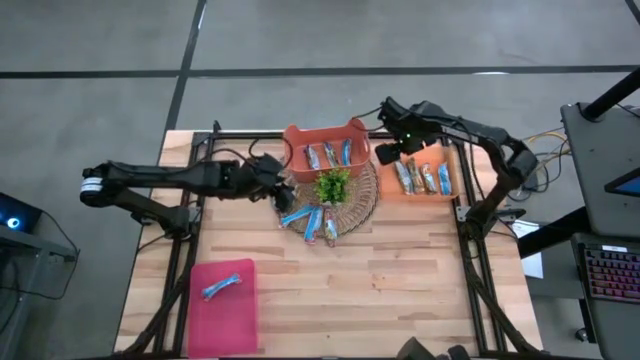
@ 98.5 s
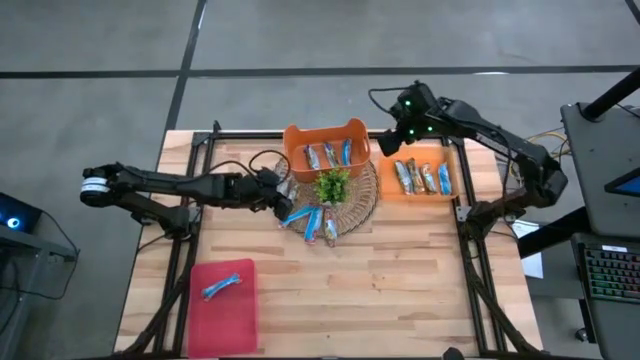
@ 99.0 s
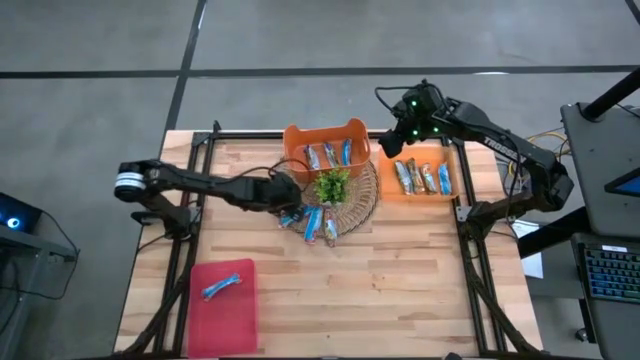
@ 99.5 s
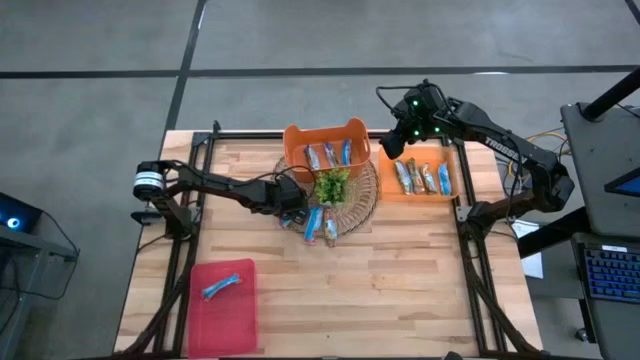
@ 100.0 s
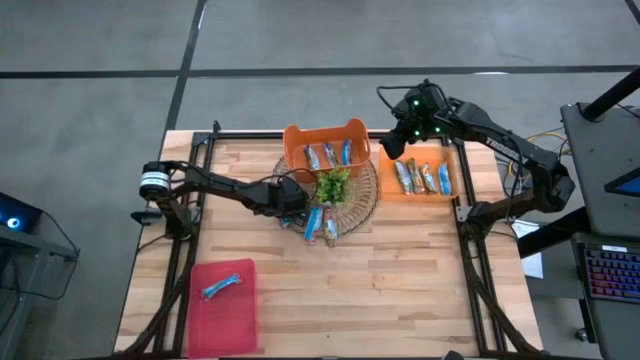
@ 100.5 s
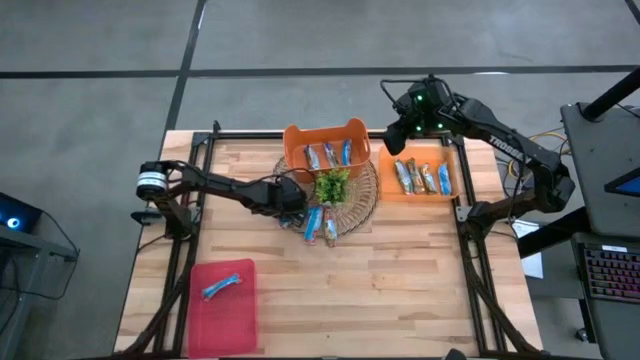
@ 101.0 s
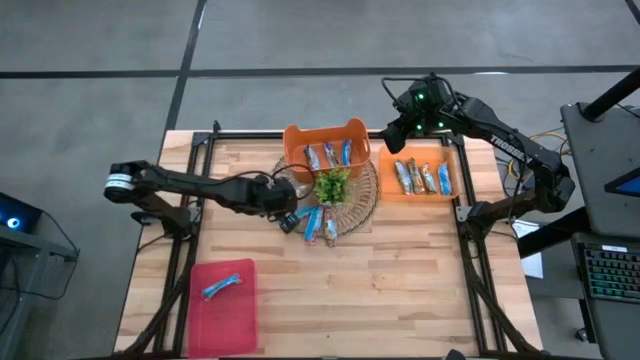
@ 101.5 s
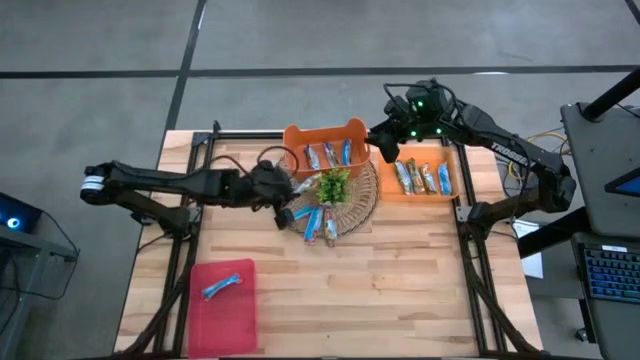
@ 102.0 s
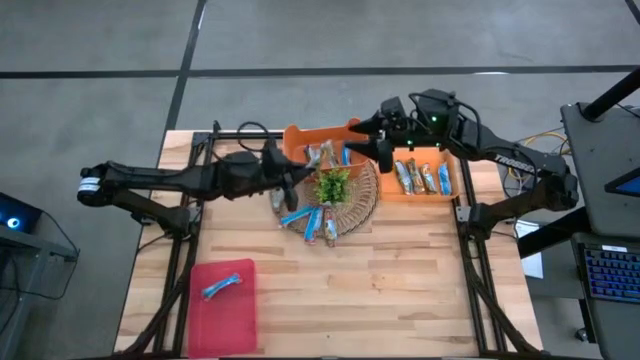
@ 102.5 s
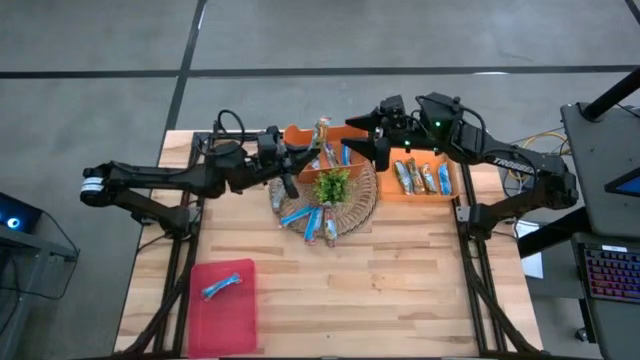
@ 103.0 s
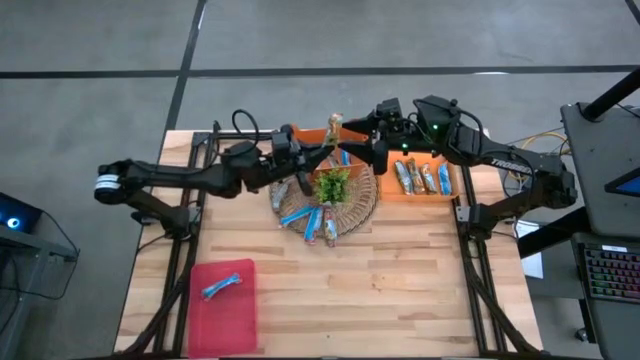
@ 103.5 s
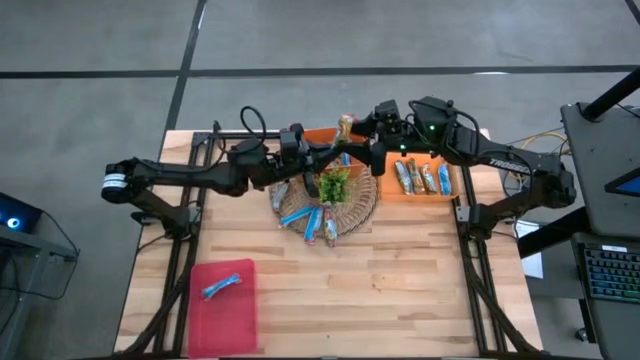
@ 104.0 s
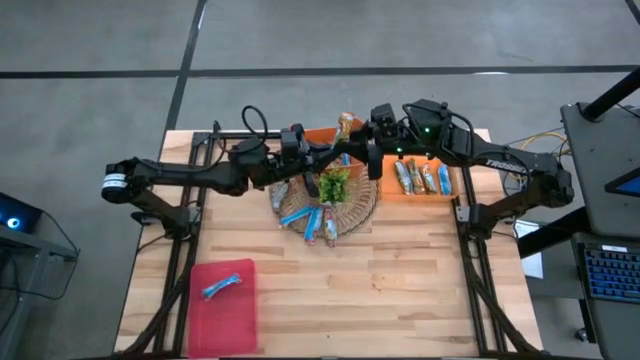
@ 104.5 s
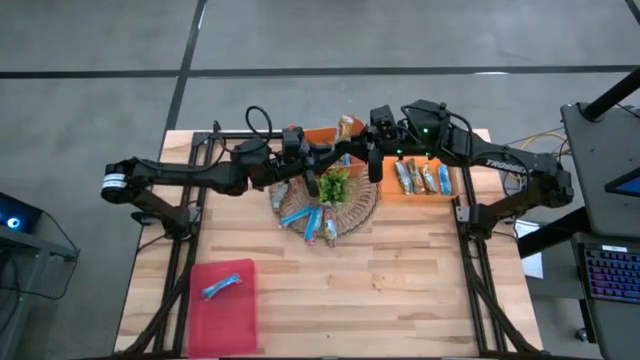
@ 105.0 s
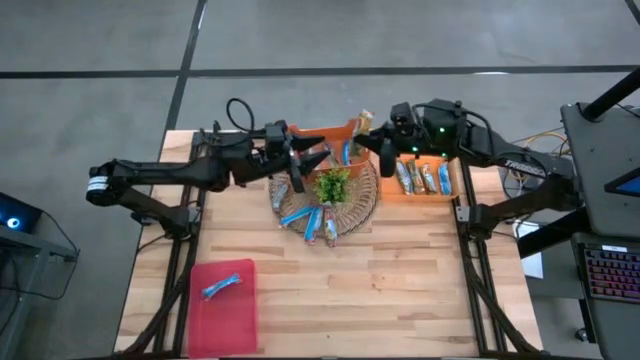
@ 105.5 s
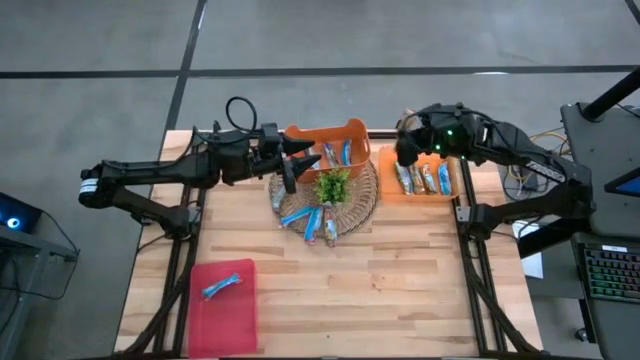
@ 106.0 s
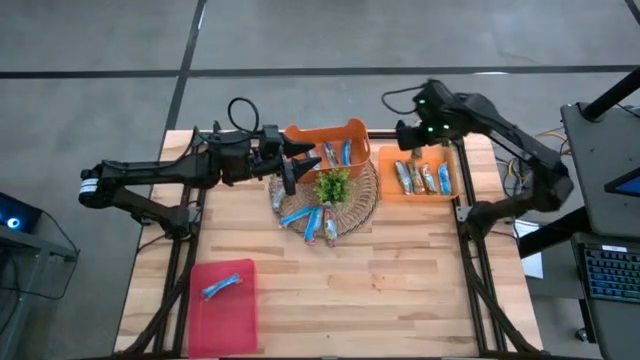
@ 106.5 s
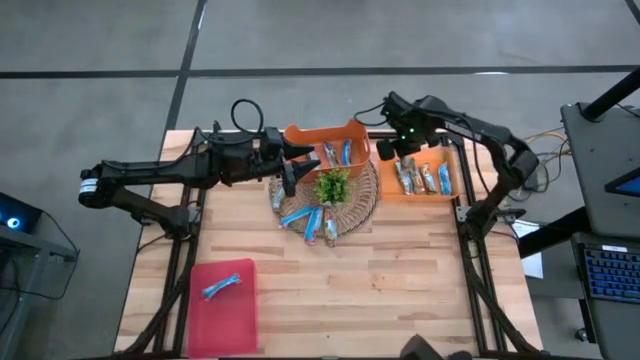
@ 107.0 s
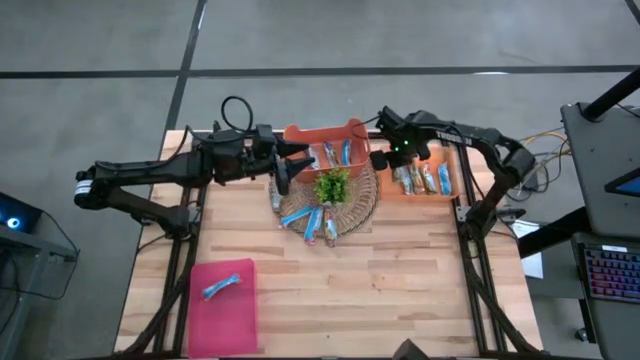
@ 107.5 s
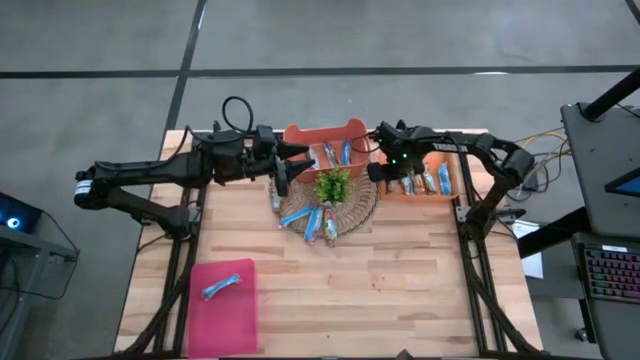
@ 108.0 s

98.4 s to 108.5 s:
Task: Pick and place Granola Bars by type
Put the orange granola bar into the orange bin

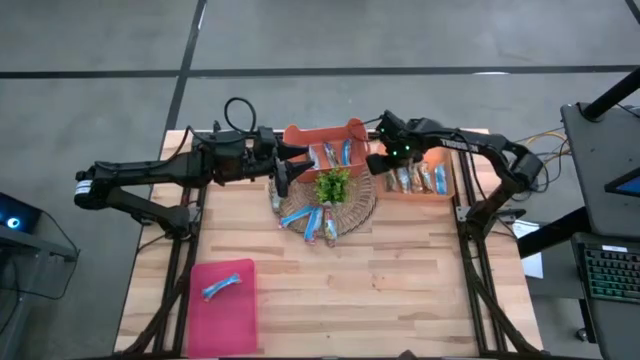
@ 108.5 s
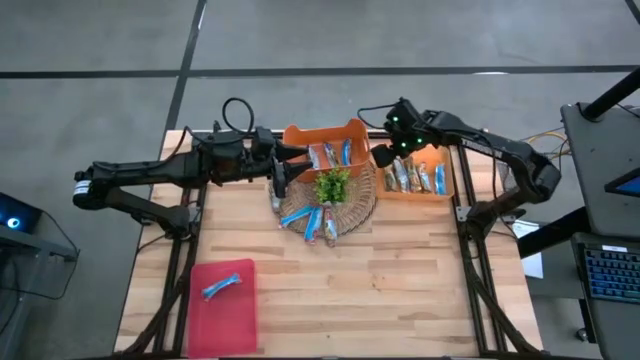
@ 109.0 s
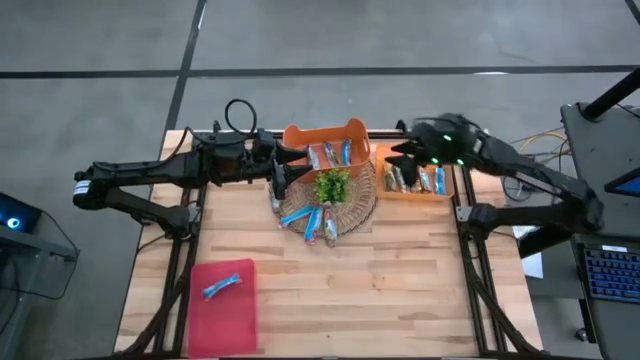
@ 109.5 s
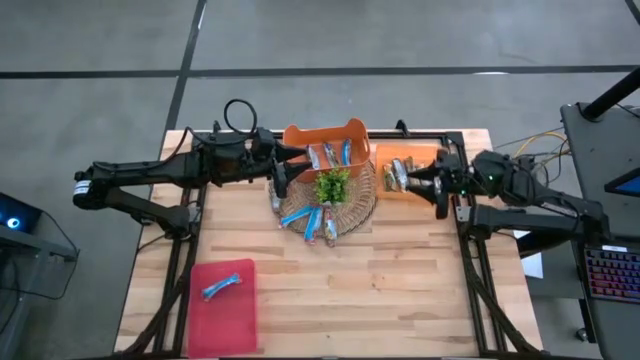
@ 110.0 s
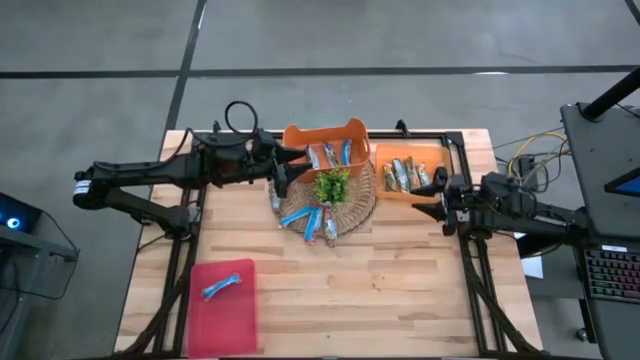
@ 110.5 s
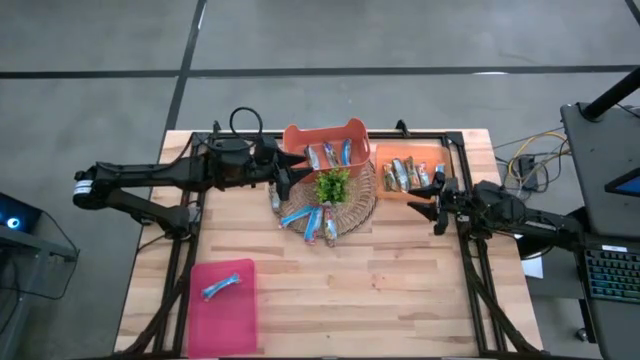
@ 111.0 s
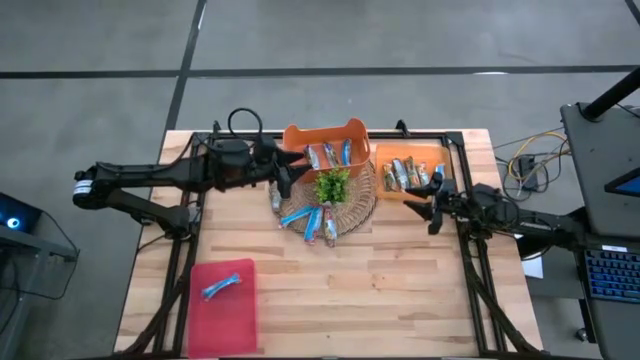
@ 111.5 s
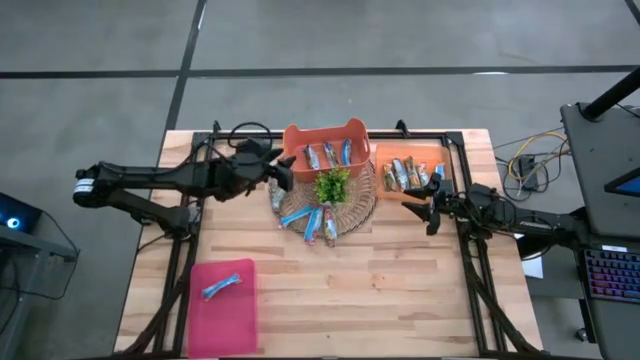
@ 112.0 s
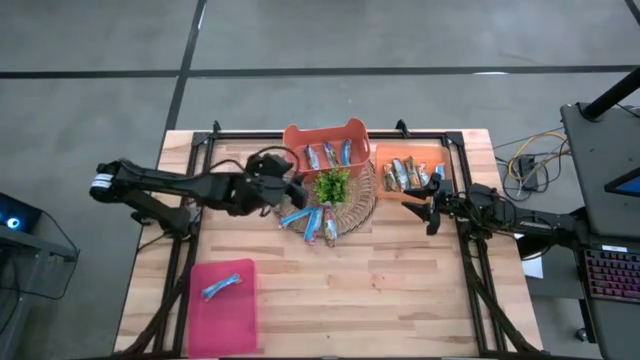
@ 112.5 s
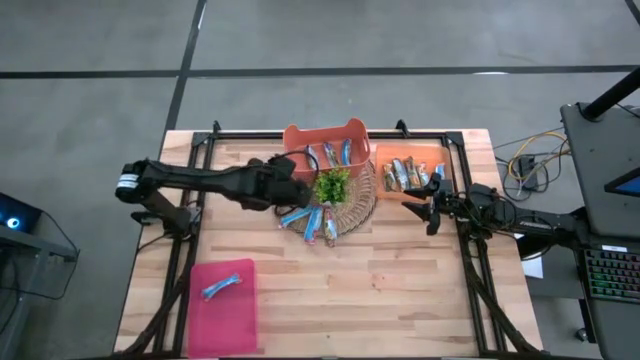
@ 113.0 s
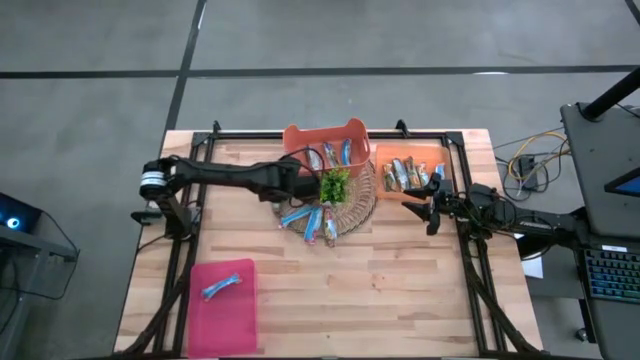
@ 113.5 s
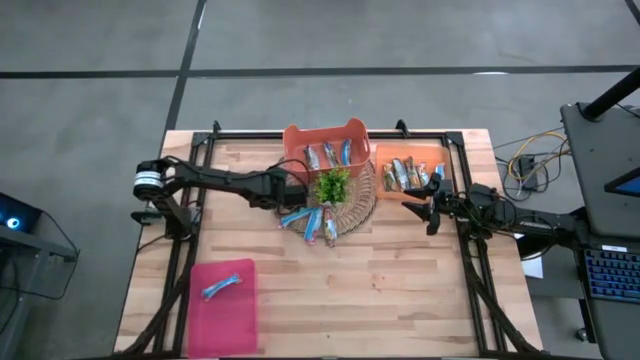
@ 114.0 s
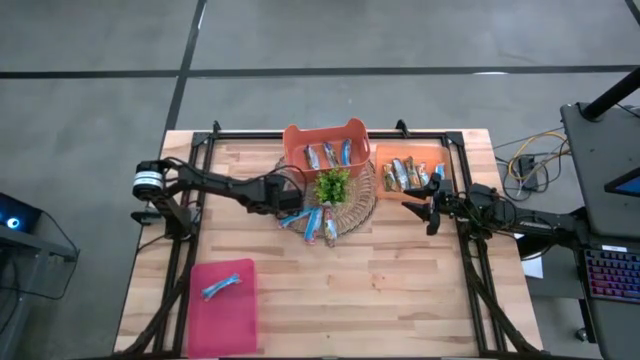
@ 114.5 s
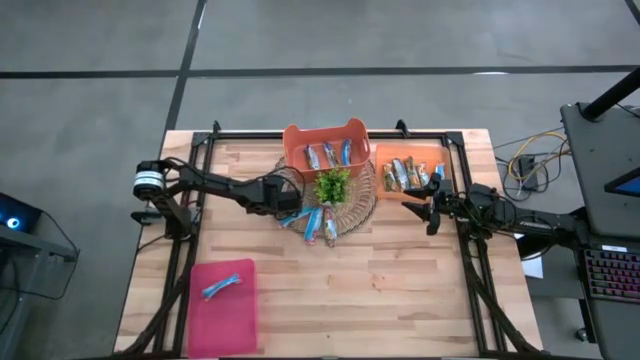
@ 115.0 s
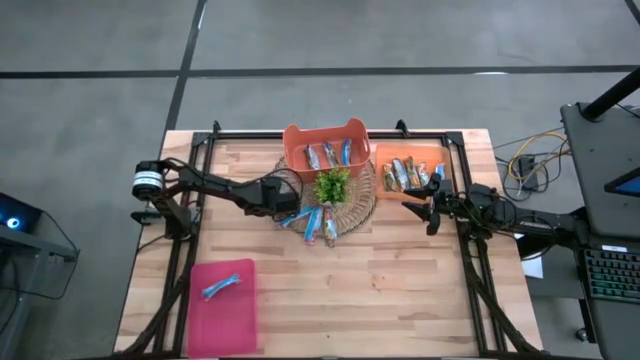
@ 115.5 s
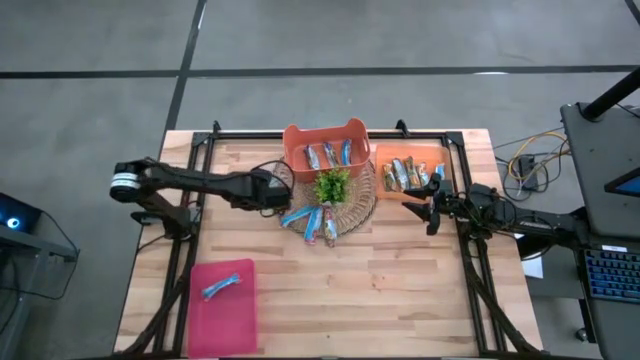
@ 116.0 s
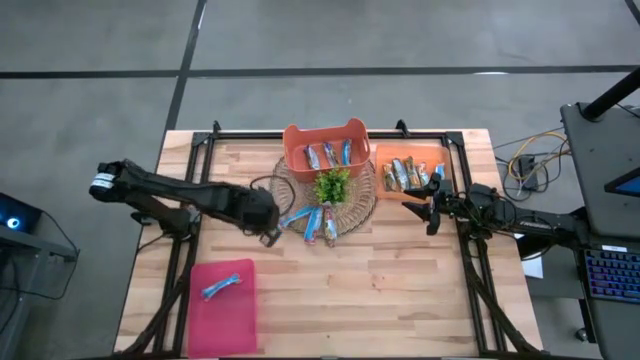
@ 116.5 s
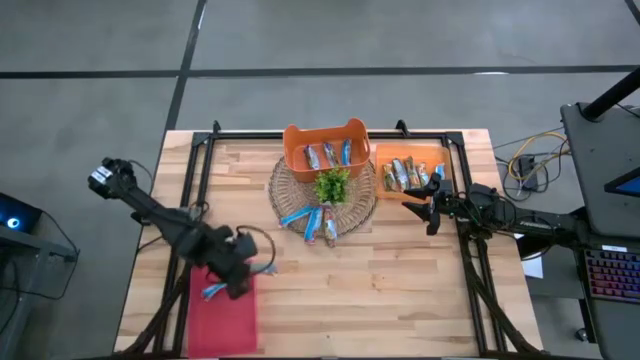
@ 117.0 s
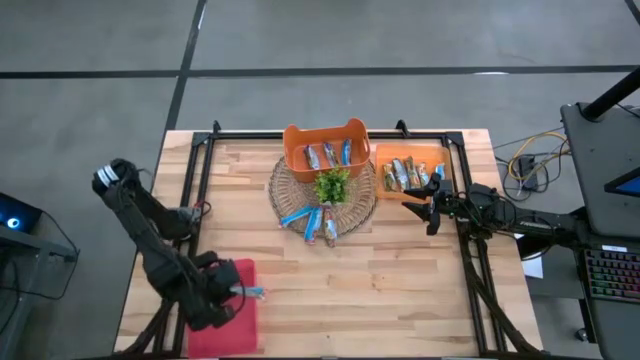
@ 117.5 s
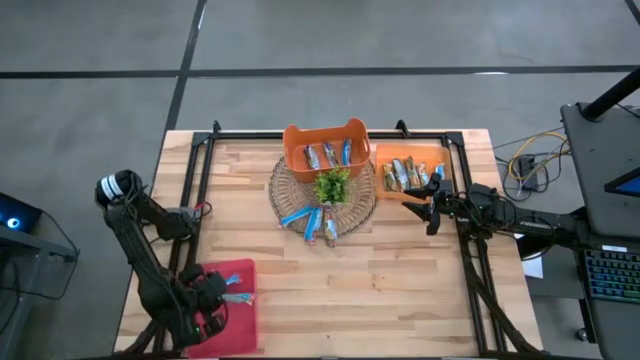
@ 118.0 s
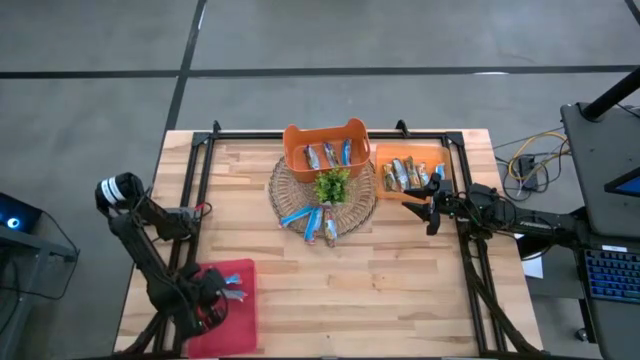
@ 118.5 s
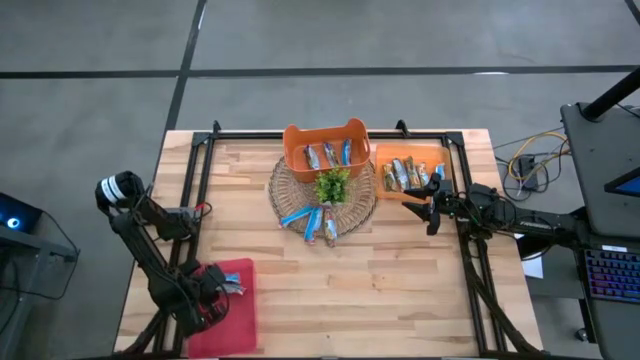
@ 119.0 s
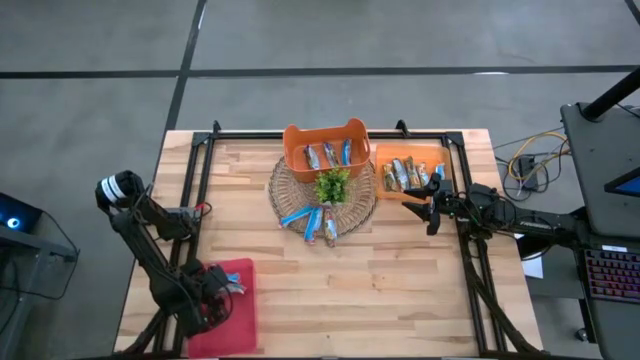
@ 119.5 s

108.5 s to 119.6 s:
Put the red granola bar into the pink bin
